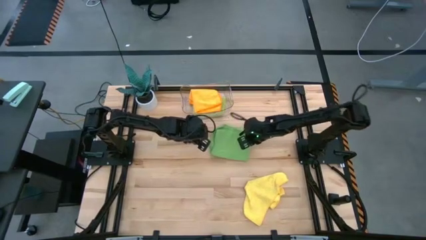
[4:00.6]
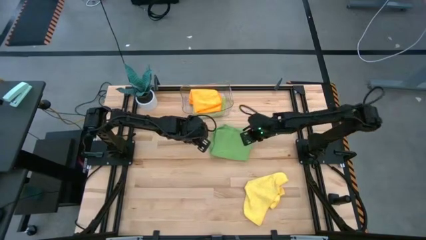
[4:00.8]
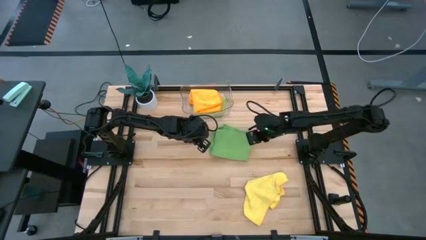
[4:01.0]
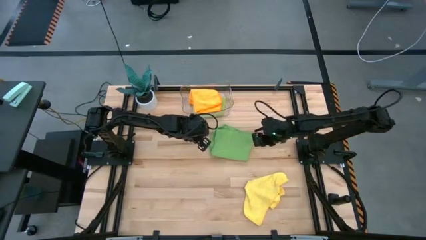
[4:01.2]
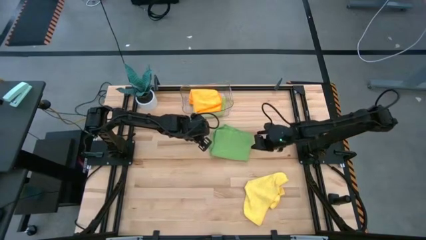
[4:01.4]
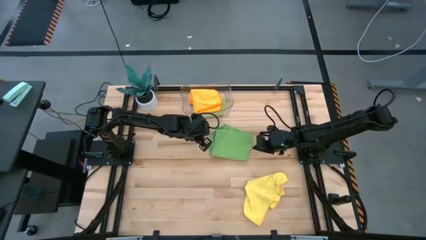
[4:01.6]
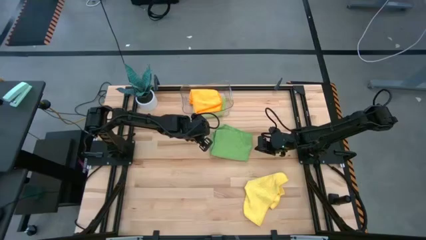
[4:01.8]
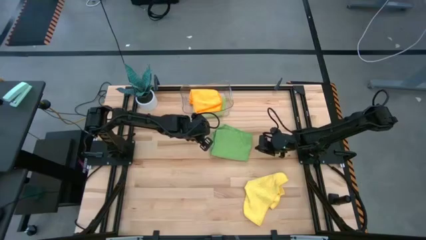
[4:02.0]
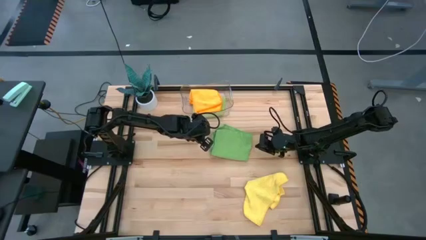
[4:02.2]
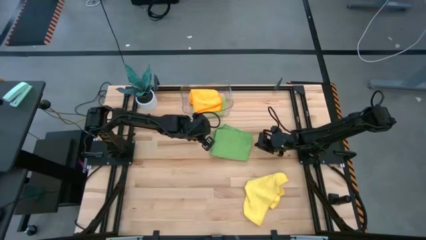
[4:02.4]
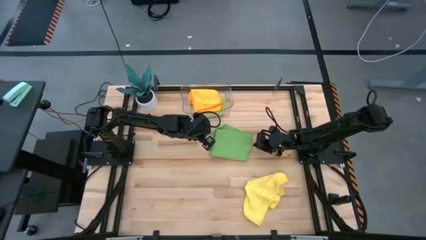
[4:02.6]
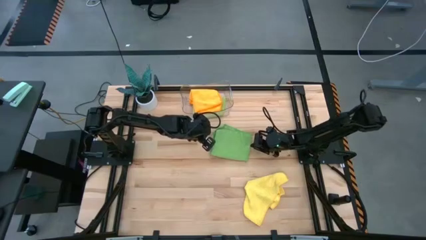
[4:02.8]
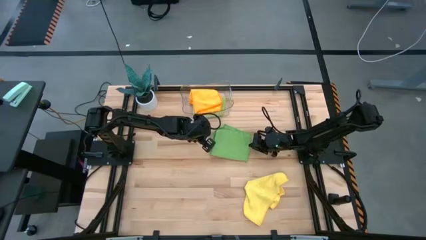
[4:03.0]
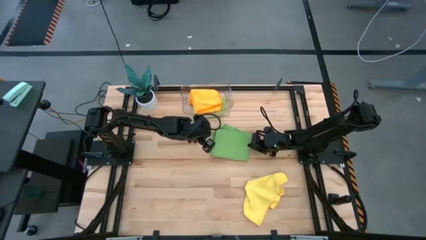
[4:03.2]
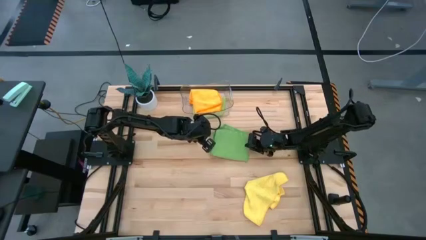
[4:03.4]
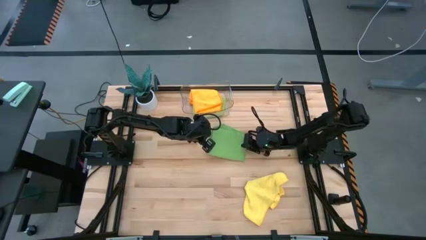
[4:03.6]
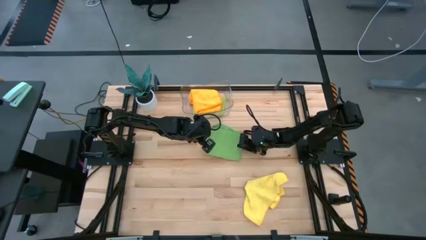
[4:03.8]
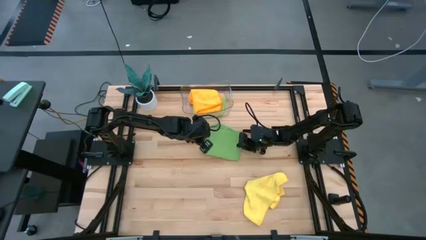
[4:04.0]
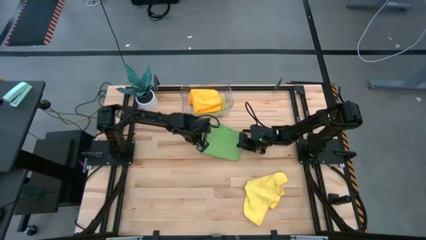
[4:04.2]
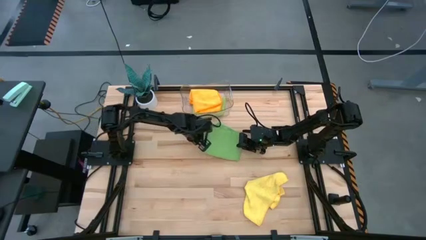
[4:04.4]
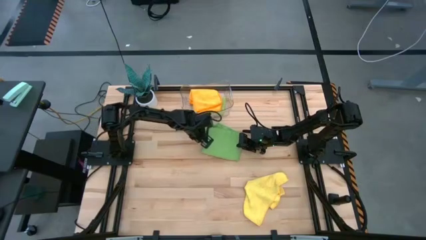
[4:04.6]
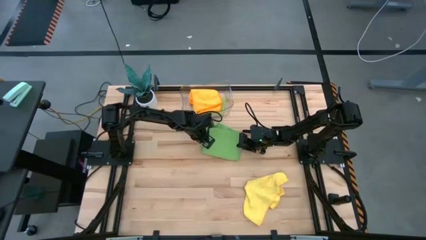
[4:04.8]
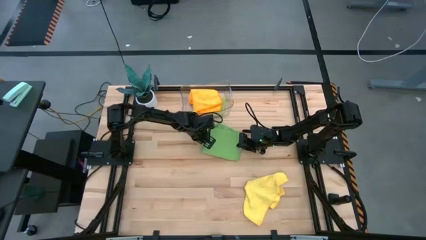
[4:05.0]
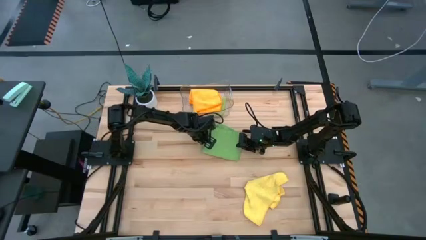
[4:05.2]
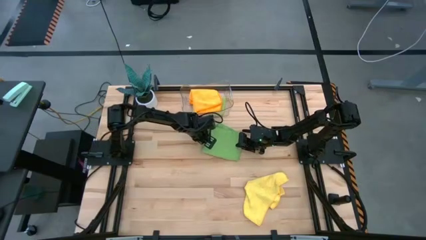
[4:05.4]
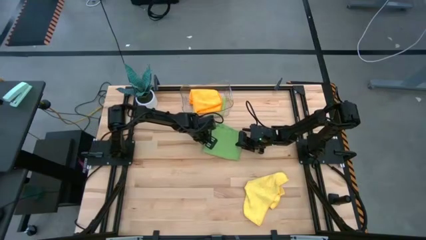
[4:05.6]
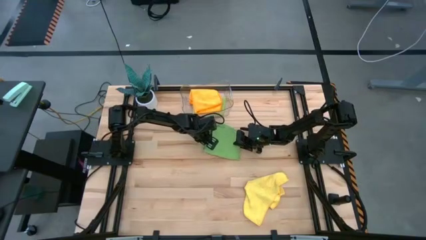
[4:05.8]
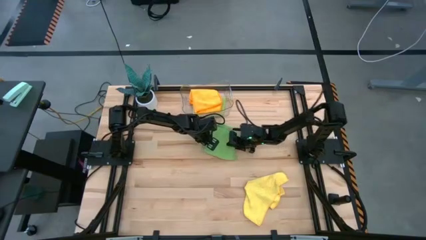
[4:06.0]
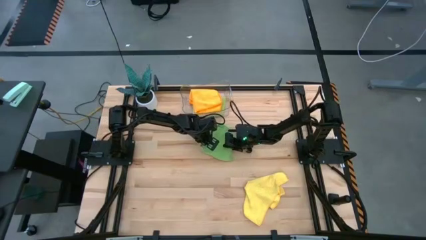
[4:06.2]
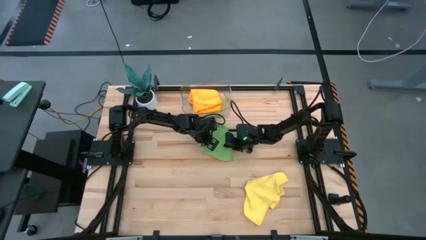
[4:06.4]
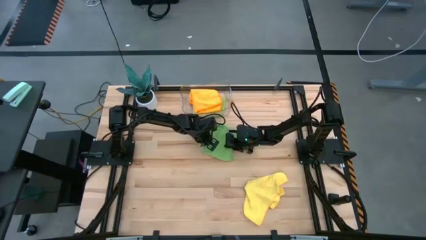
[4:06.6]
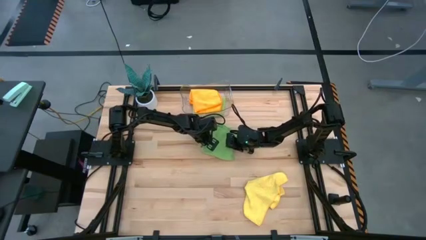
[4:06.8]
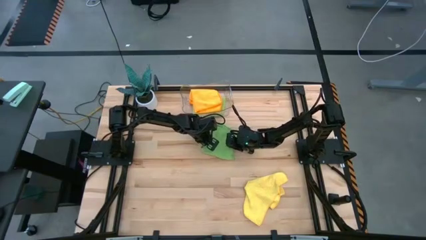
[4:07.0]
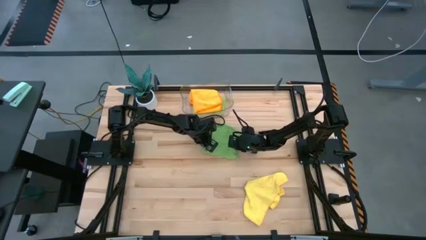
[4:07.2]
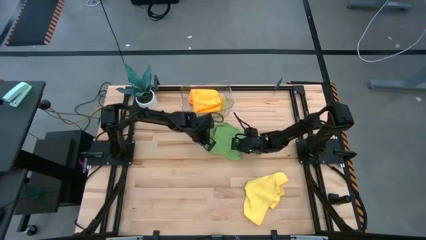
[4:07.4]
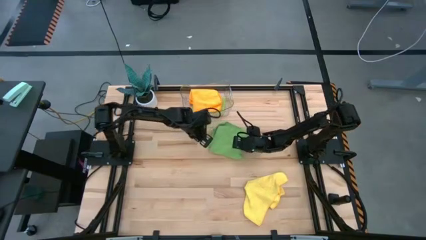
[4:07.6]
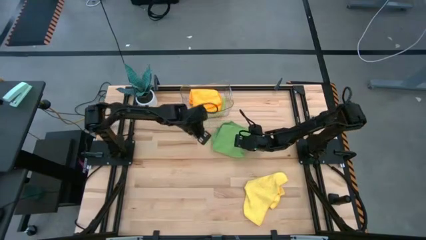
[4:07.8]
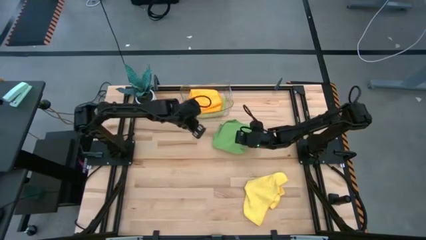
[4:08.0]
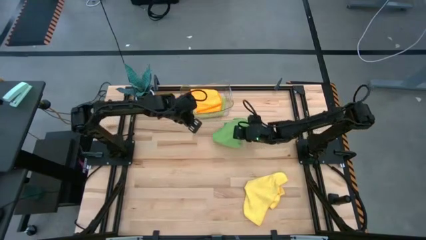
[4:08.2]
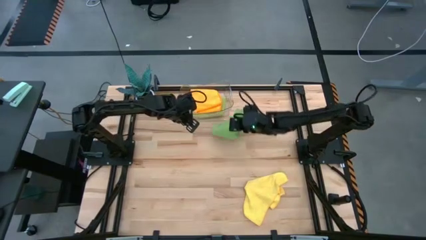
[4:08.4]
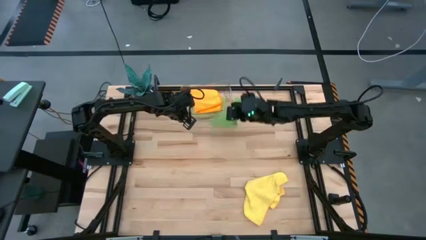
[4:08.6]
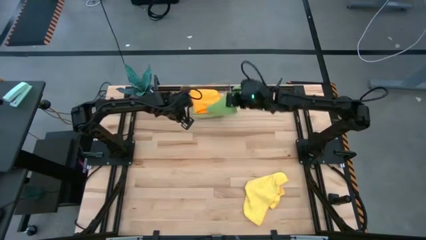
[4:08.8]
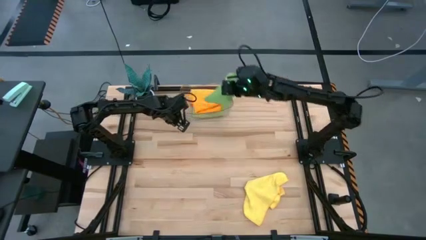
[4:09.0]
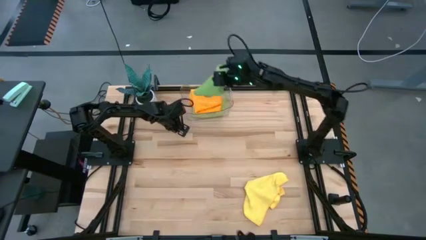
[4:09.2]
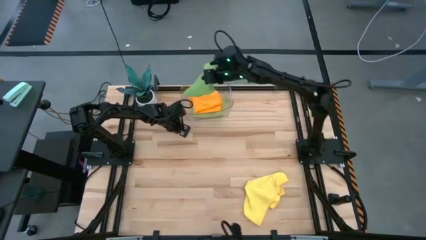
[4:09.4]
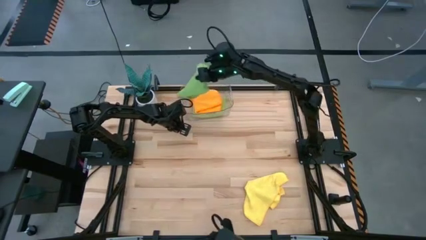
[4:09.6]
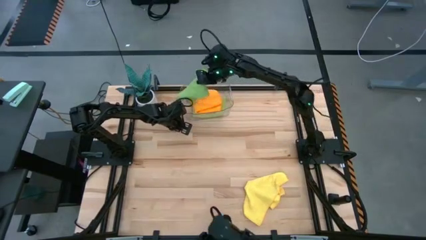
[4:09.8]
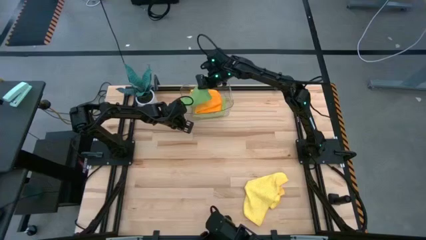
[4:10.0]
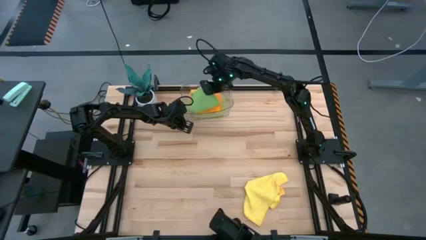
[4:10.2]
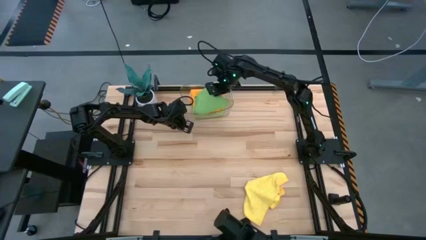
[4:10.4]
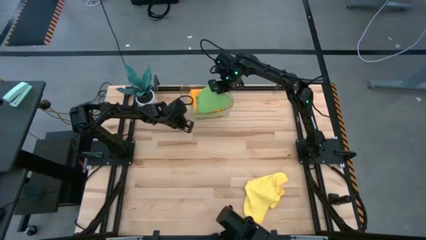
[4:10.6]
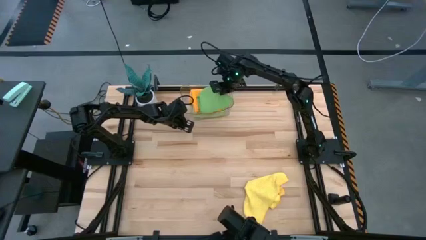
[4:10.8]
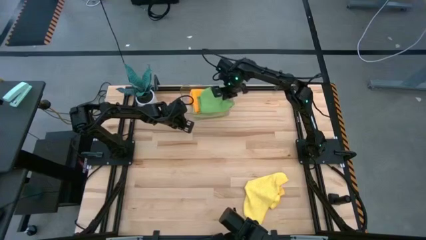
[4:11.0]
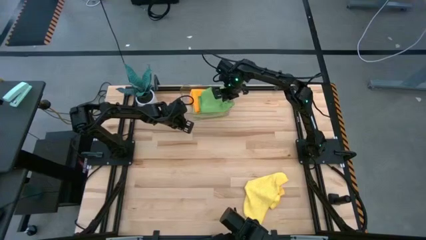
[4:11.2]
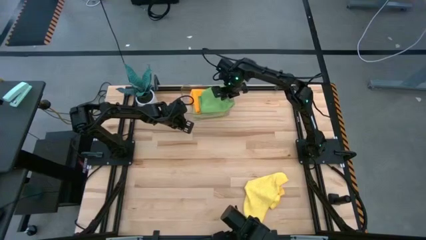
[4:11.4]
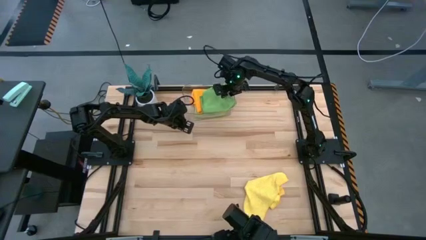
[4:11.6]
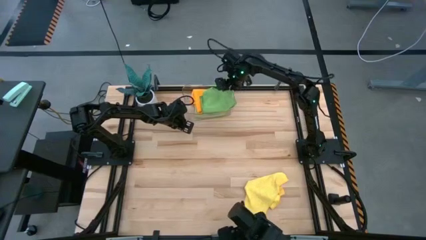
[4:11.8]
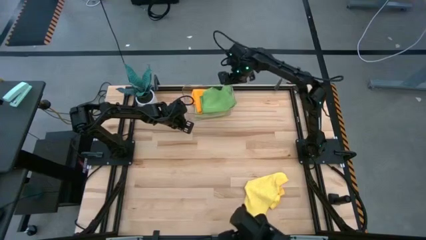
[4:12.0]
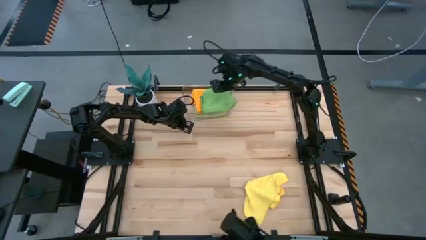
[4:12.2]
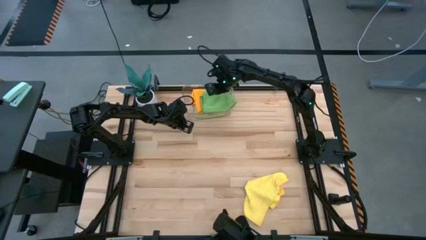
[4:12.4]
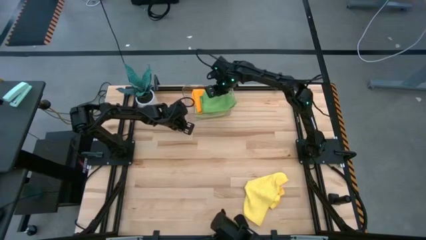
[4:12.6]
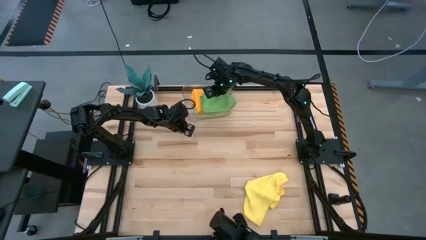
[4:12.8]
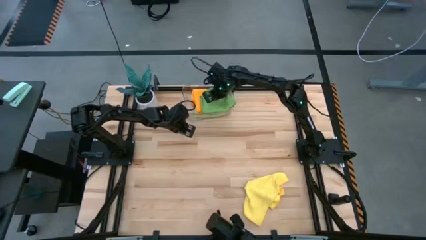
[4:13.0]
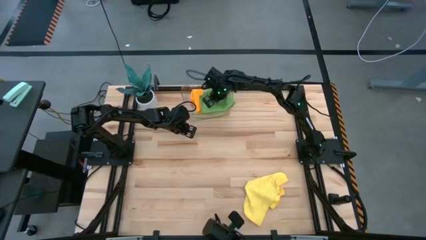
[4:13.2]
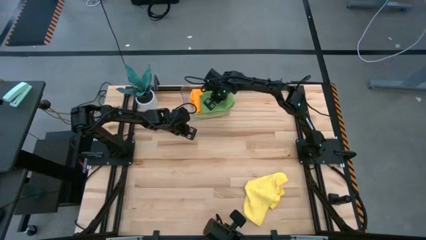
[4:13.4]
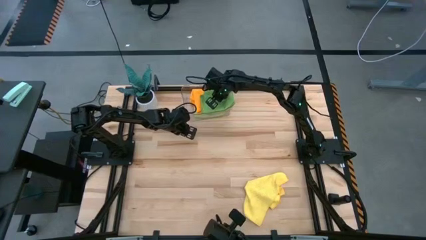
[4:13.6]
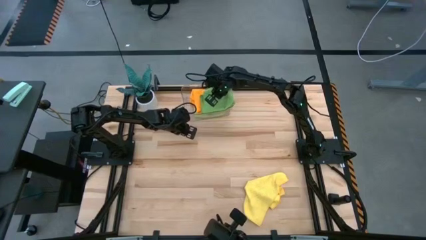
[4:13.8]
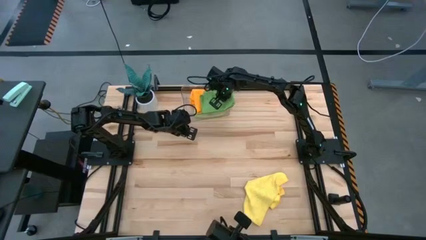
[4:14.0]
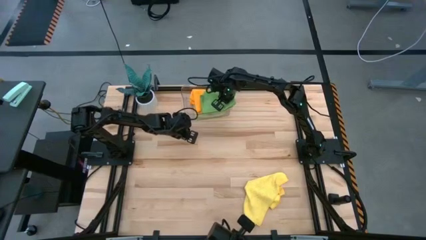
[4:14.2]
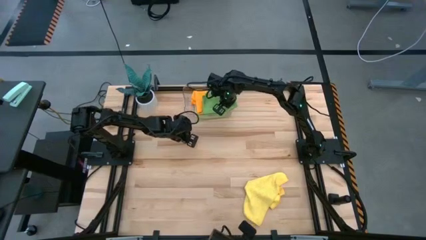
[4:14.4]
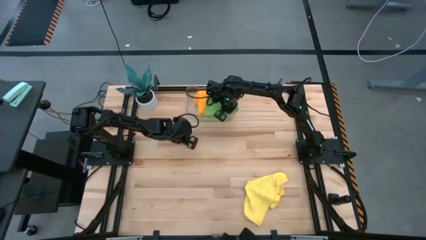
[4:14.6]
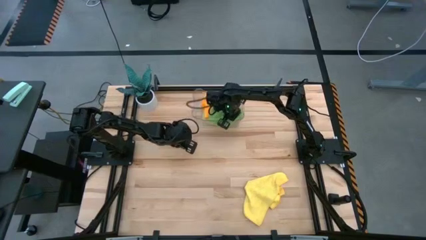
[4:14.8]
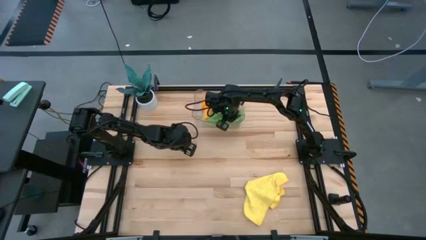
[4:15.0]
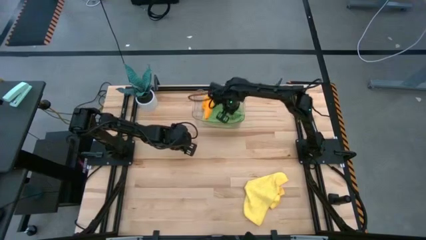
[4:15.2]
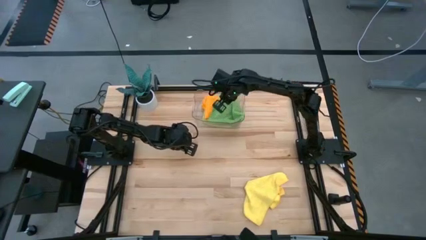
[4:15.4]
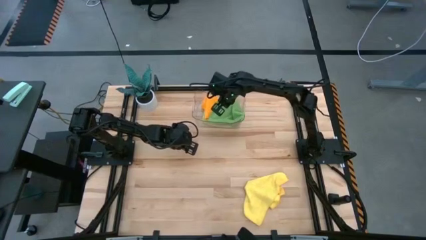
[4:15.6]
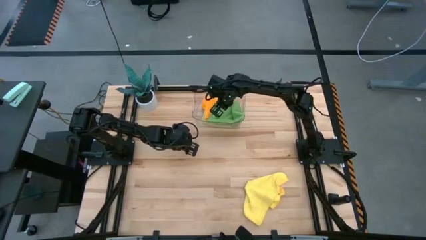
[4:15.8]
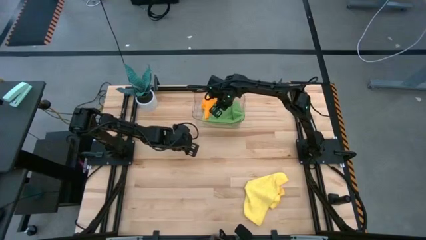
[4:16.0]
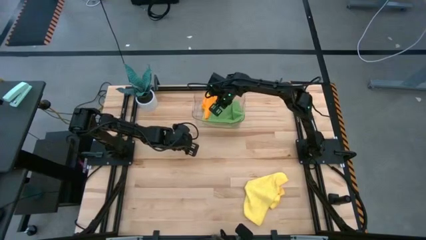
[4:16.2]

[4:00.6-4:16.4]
Task: Fold microfiber towels
Put the green microfiber cloth into the transparent bin
